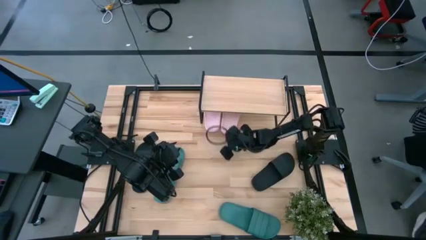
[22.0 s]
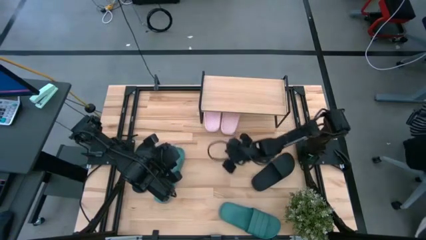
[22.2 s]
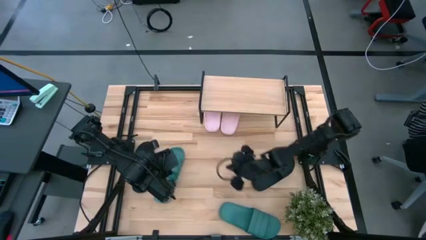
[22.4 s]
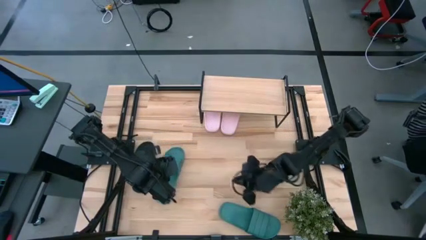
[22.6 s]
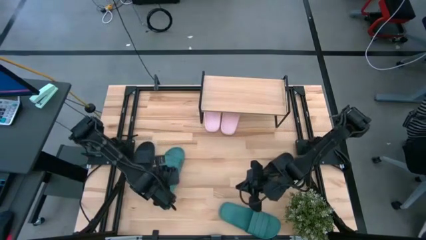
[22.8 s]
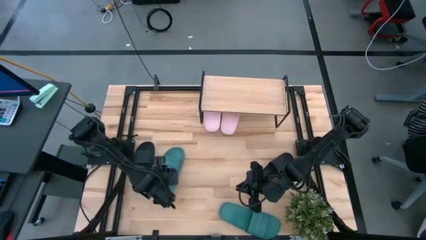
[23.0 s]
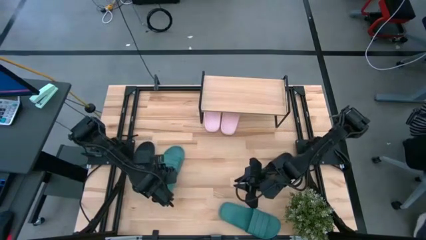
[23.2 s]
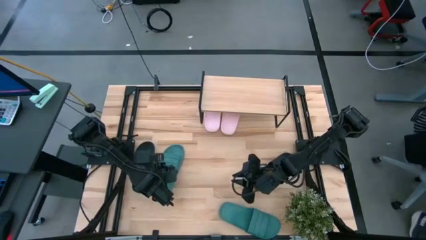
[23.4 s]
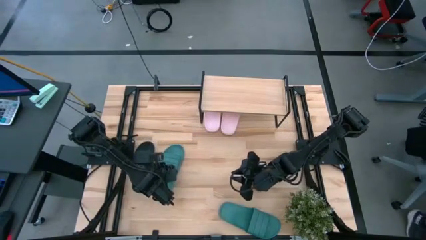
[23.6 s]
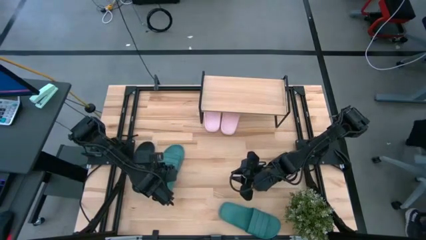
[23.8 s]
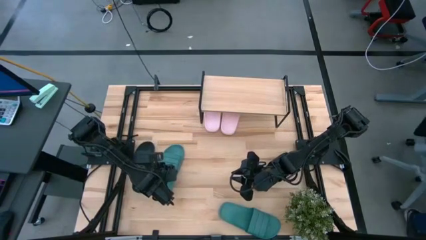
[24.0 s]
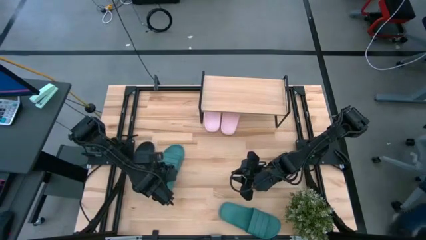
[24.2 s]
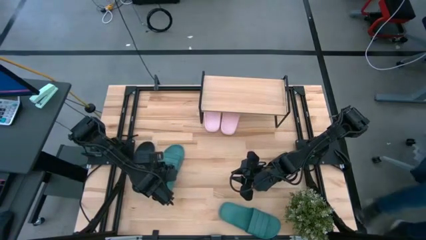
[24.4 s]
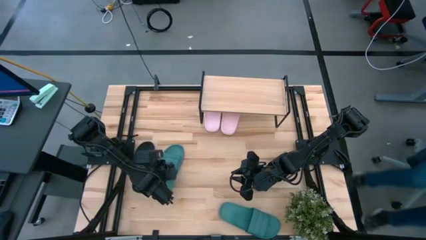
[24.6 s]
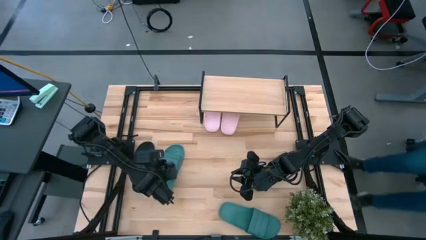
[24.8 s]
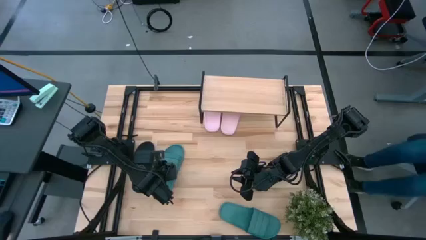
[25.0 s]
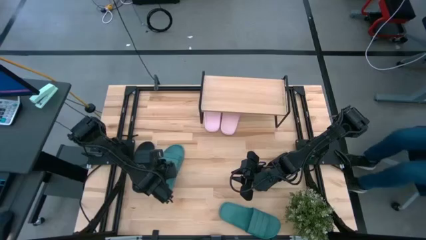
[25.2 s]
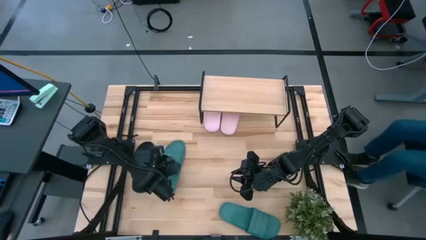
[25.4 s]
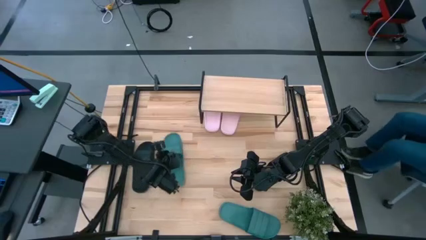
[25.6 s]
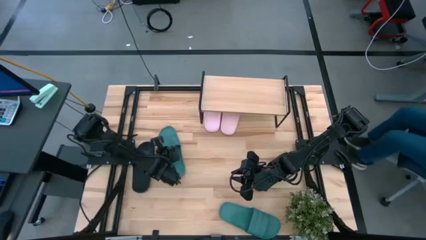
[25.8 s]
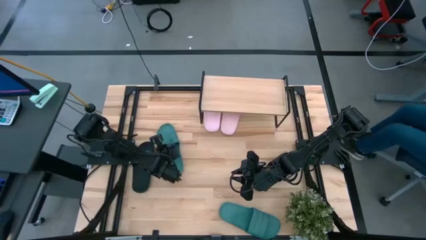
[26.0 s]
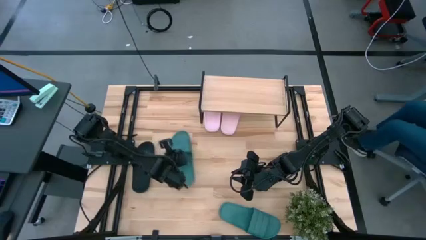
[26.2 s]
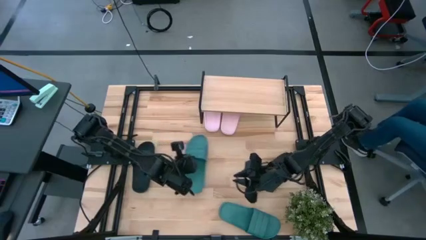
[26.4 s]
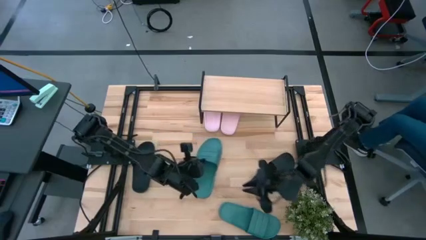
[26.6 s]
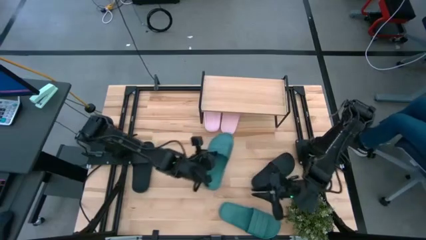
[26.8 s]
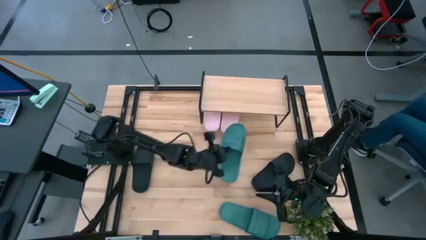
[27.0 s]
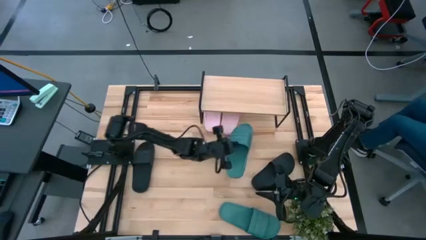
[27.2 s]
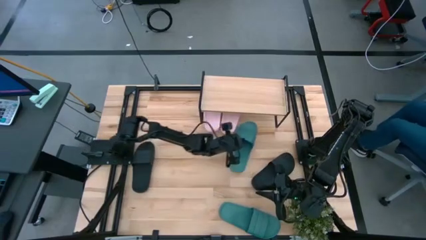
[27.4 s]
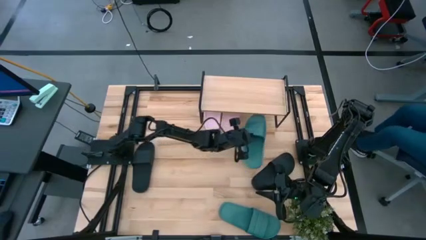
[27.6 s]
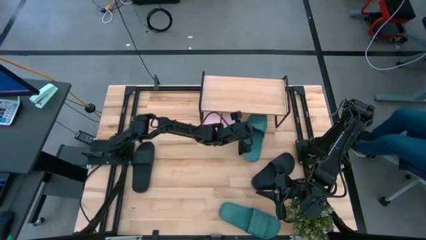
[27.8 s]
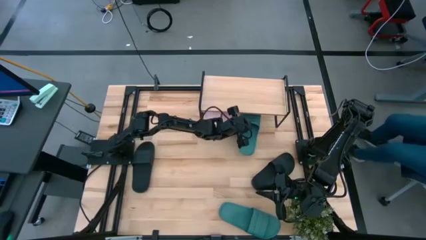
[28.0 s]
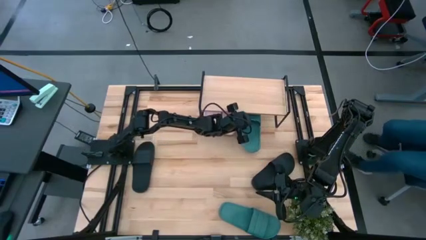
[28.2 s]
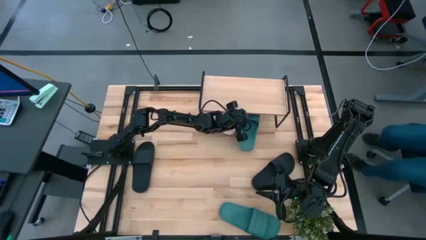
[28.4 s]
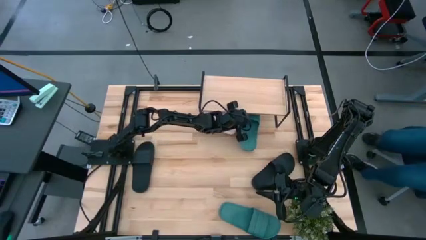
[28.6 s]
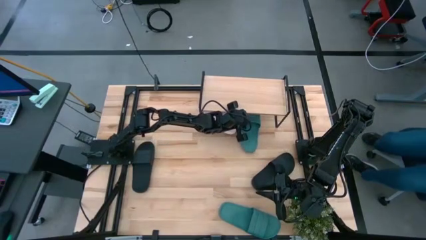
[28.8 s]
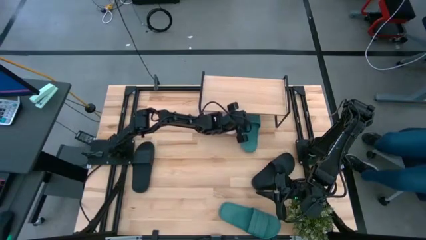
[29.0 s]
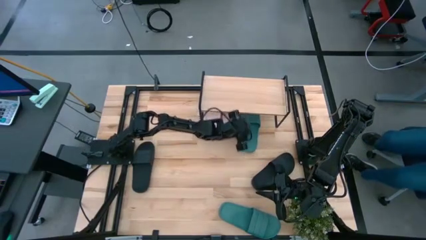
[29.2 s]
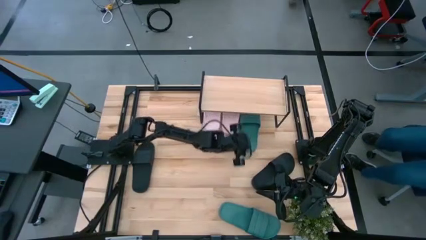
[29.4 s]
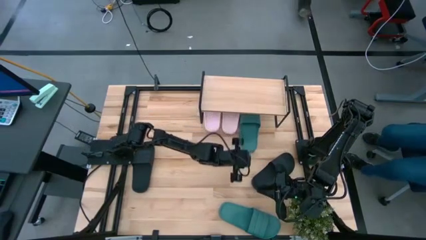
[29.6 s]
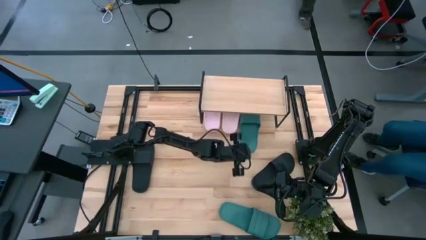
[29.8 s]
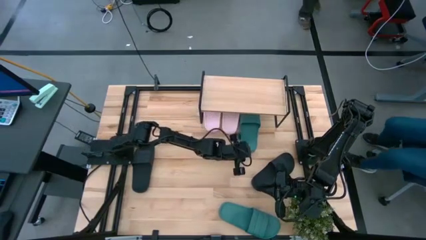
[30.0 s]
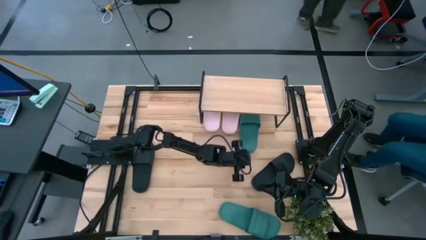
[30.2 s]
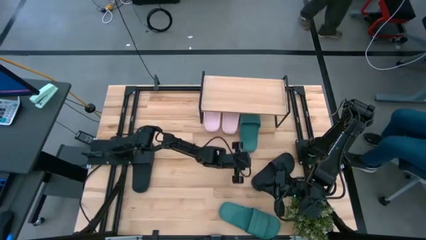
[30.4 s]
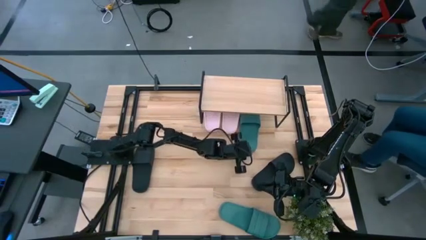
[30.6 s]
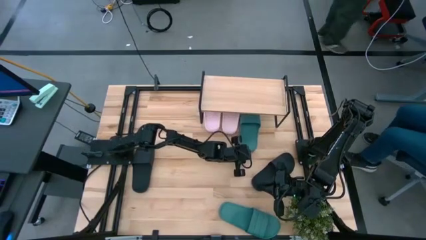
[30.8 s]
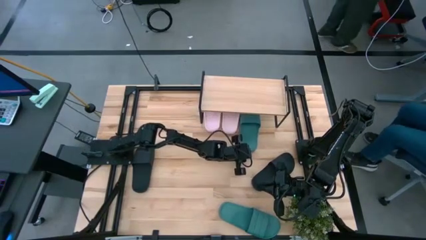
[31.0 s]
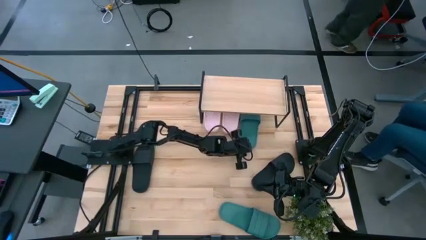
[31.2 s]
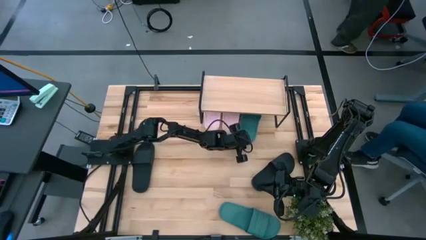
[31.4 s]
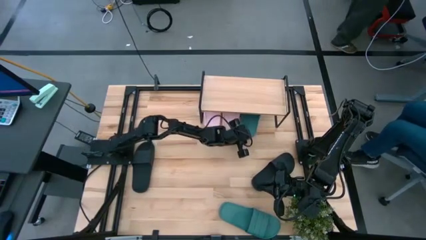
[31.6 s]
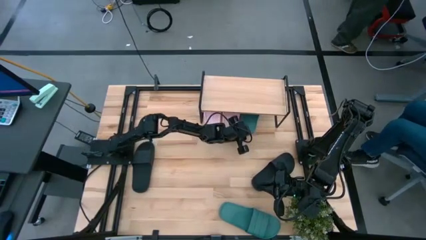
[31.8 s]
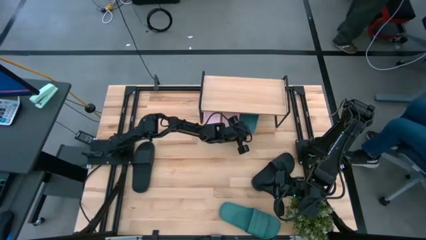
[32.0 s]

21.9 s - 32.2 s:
Task: Pick and place slides into the shelf
Put the left dark green slide under the shelf

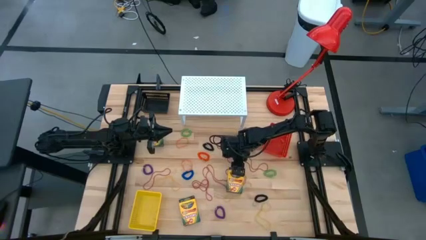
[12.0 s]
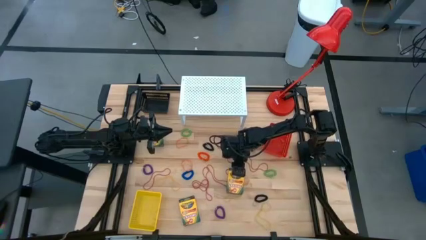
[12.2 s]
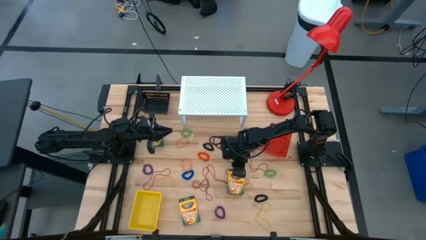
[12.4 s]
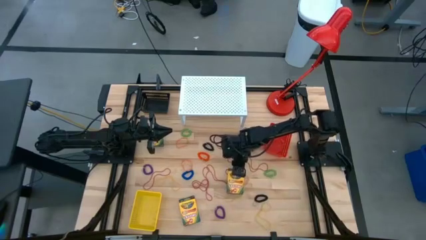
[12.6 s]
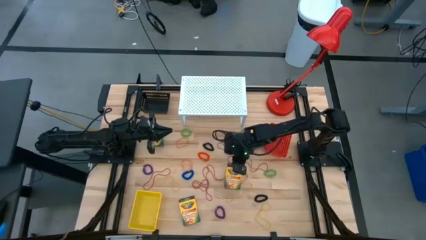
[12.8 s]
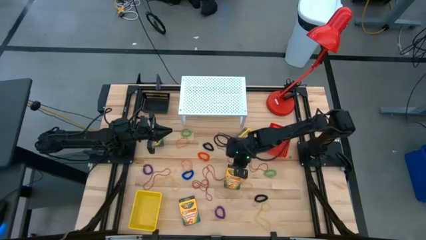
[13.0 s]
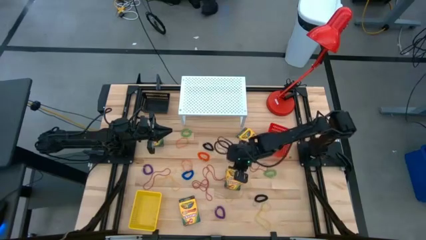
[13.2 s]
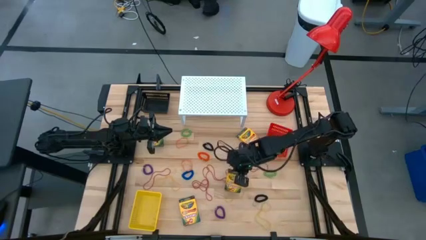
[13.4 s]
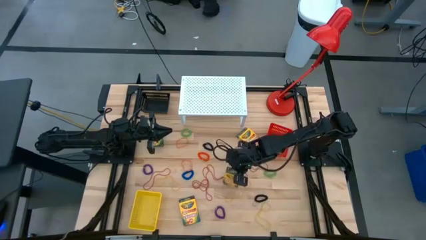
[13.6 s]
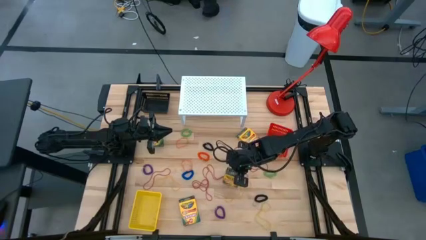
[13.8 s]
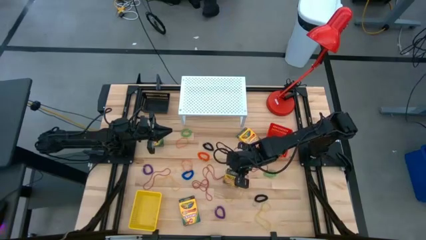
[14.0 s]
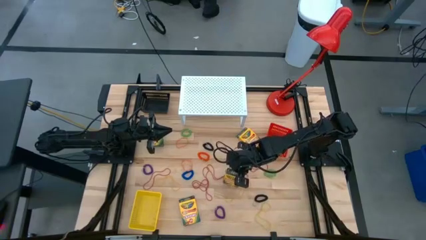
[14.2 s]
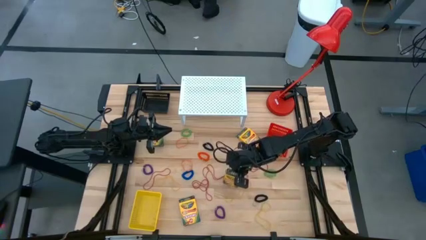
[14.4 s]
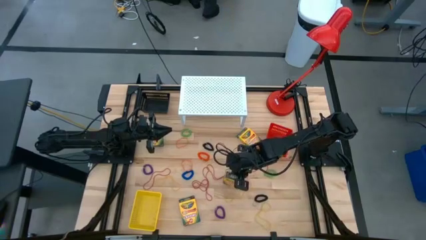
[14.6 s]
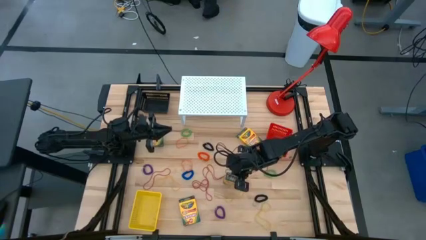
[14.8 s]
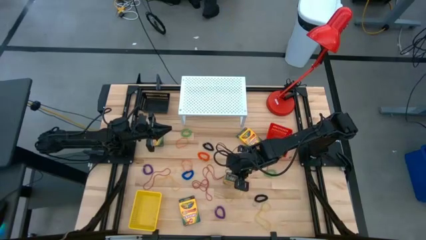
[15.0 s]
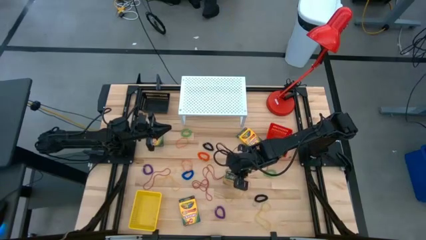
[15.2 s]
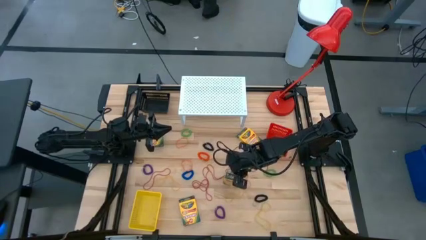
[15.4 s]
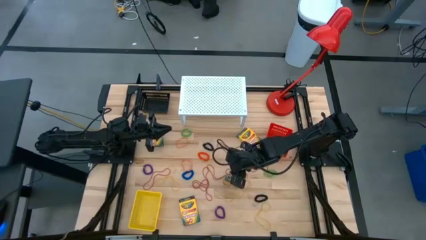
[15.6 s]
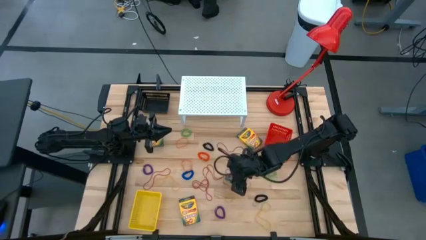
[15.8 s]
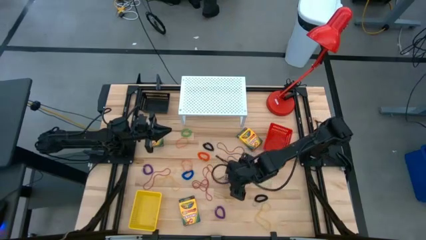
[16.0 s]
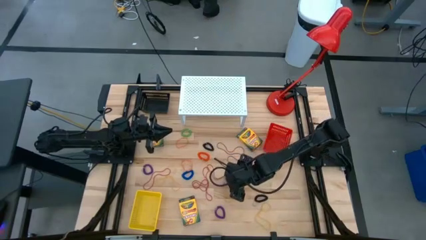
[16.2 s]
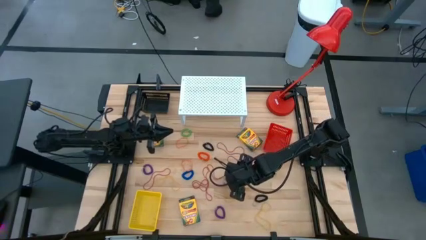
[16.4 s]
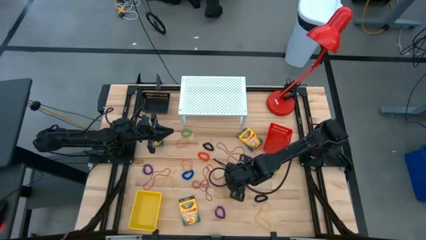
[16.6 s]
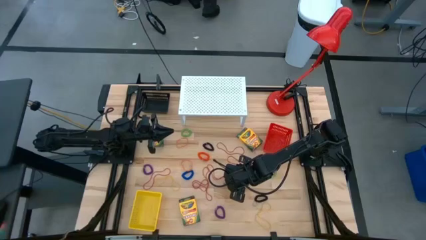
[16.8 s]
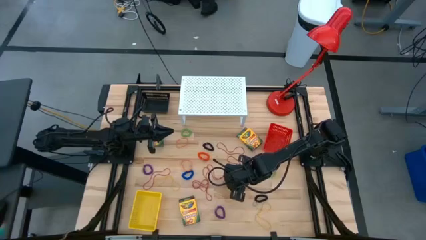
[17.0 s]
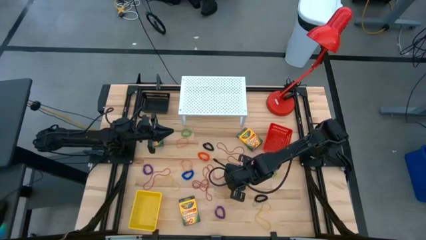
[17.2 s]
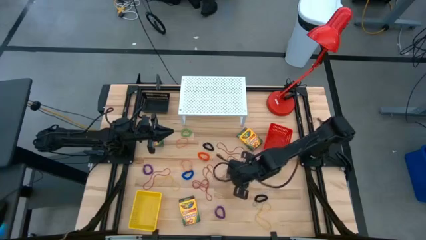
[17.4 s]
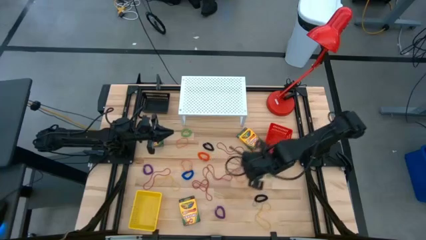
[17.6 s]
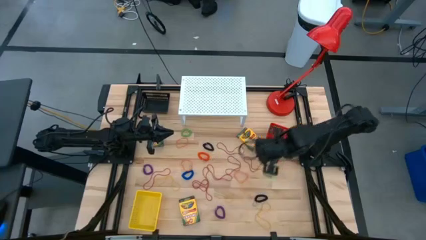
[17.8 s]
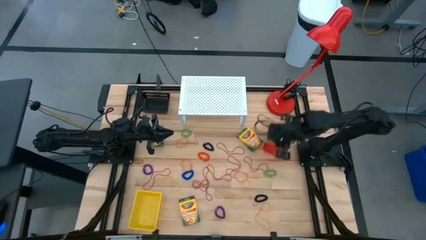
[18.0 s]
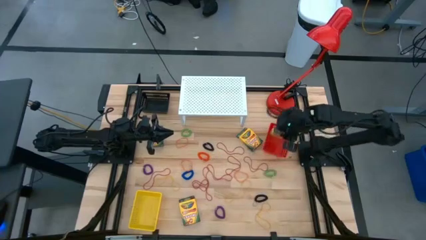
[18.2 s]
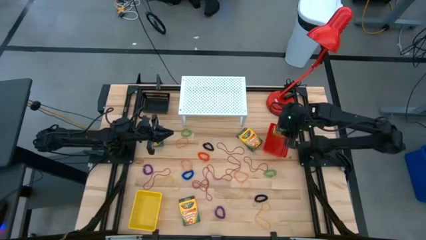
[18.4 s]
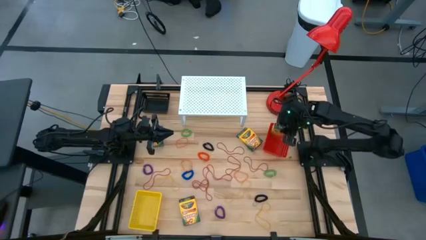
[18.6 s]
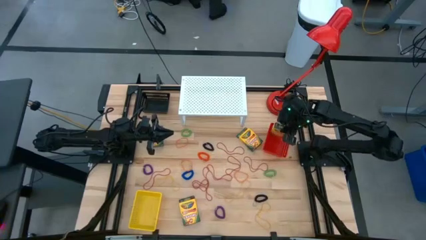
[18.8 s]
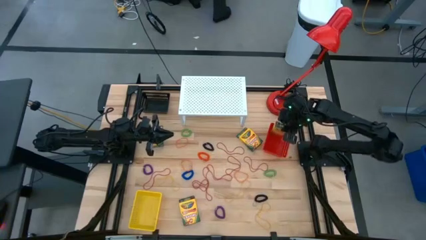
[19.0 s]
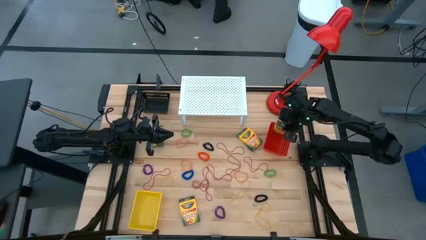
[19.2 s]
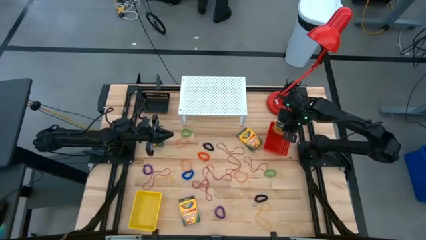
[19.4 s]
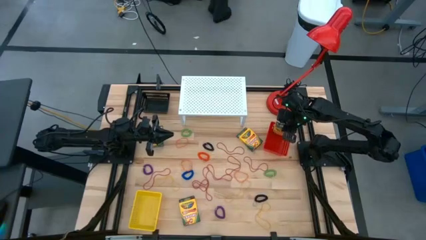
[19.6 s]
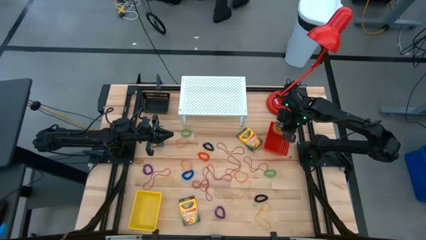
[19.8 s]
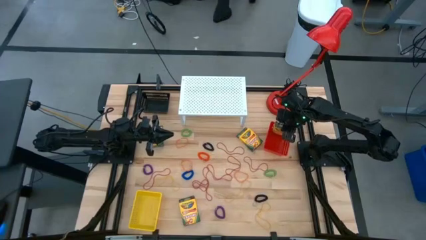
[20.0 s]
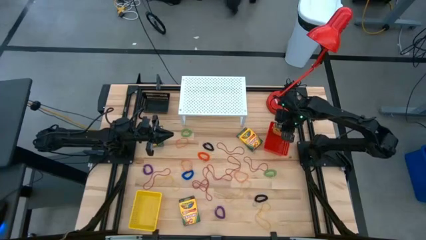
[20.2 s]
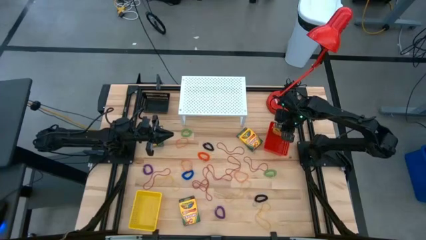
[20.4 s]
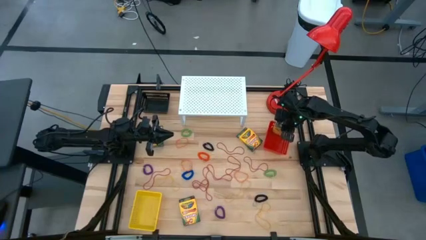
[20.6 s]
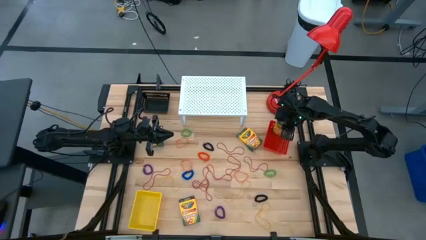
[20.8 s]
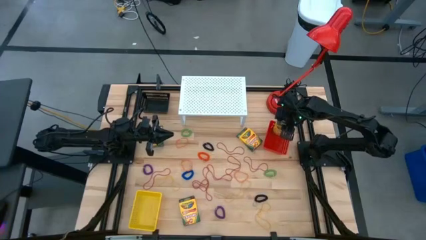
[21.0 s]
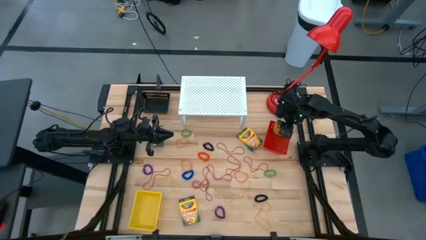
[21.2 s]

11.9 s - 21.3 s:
Task: Pick & Place Office Desk Supplies
Put the box yellow crayon into the red bin
